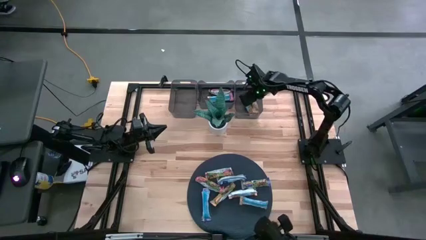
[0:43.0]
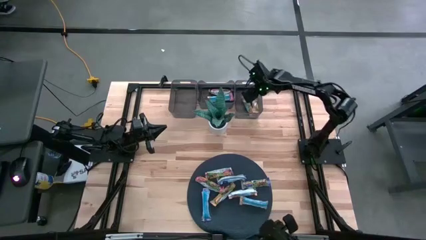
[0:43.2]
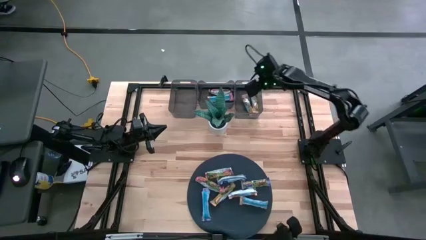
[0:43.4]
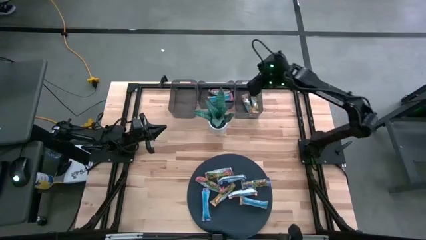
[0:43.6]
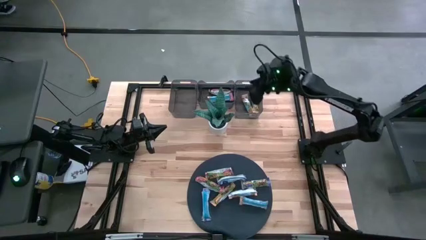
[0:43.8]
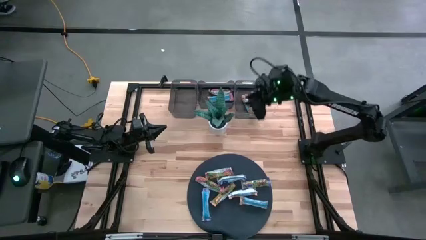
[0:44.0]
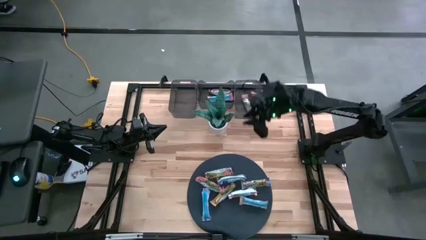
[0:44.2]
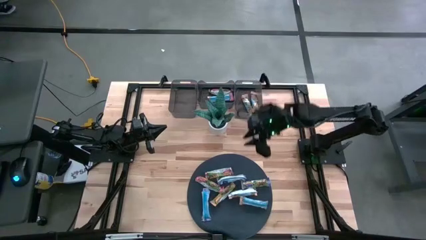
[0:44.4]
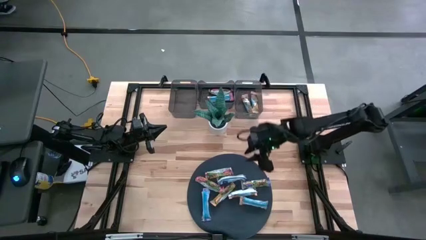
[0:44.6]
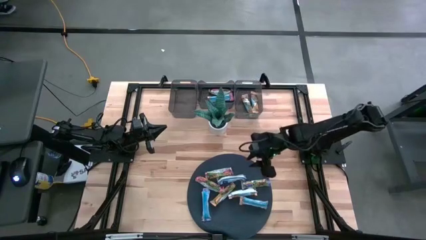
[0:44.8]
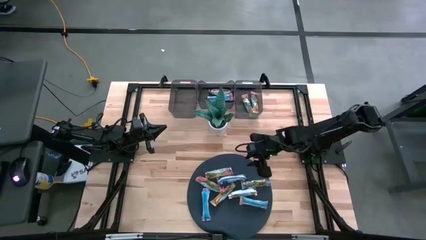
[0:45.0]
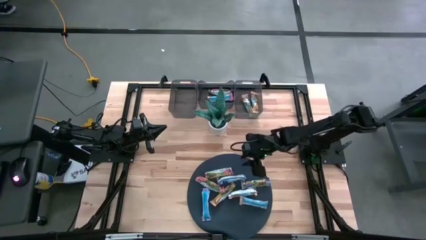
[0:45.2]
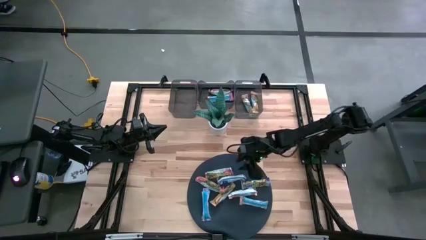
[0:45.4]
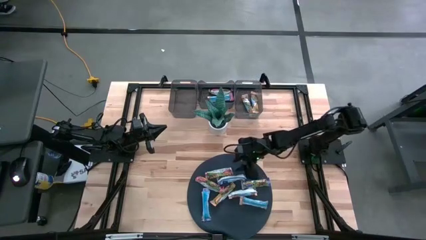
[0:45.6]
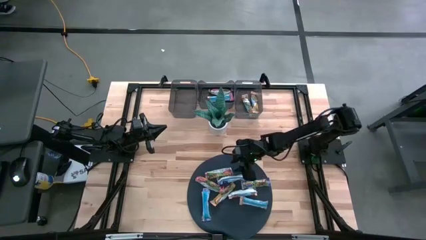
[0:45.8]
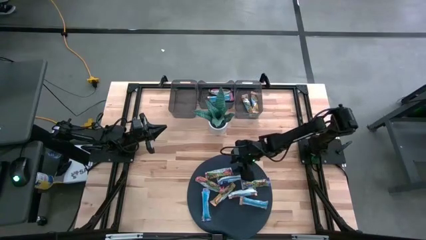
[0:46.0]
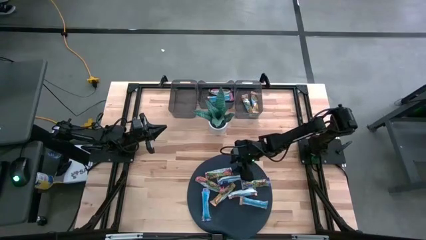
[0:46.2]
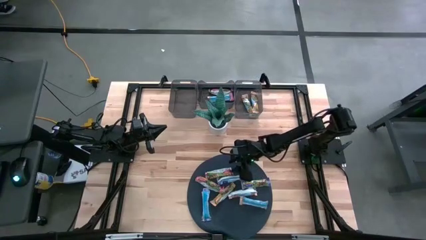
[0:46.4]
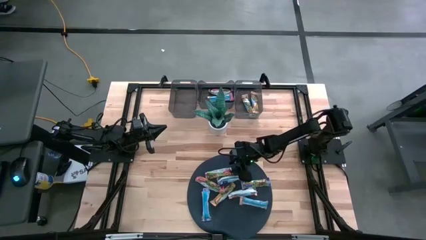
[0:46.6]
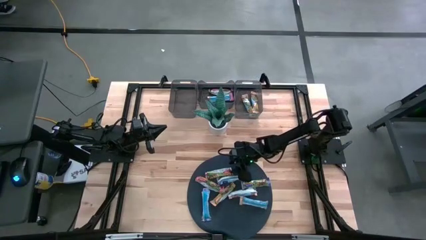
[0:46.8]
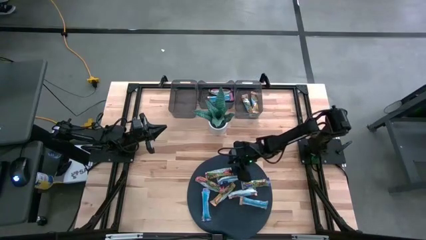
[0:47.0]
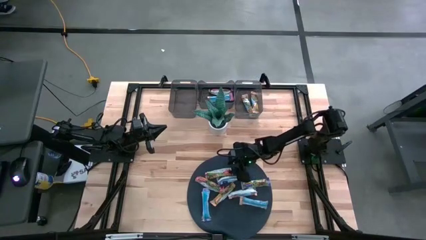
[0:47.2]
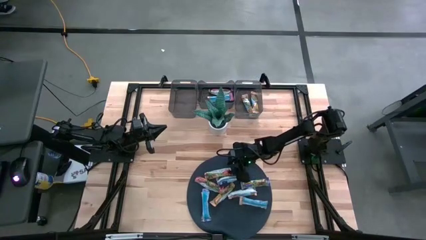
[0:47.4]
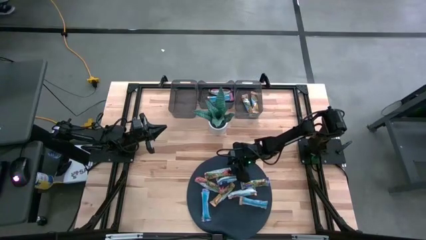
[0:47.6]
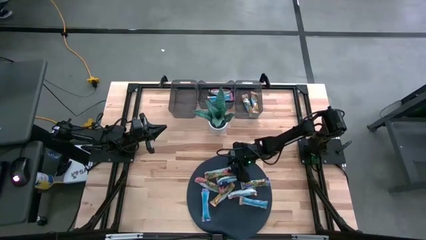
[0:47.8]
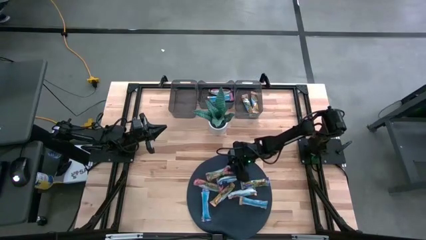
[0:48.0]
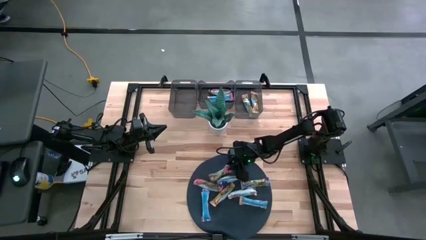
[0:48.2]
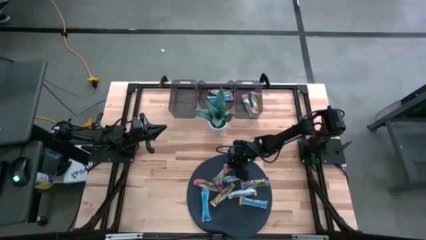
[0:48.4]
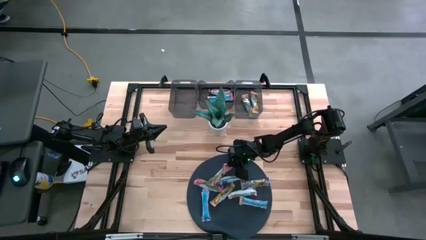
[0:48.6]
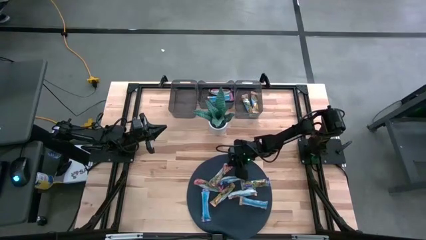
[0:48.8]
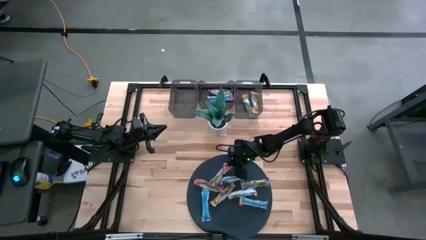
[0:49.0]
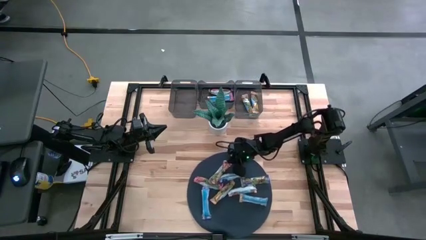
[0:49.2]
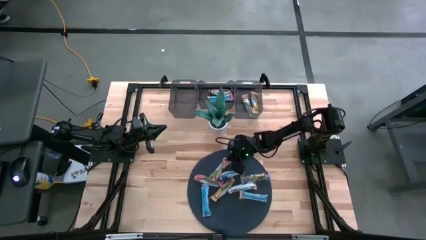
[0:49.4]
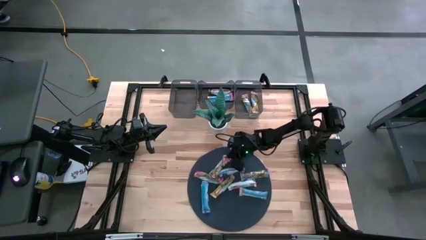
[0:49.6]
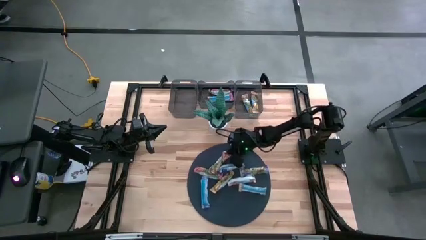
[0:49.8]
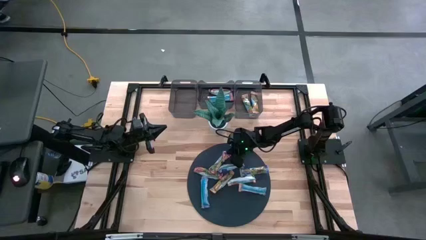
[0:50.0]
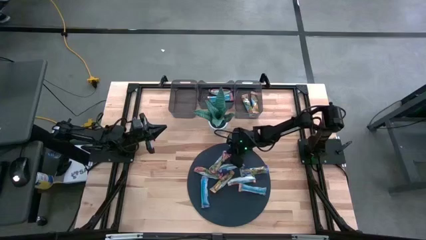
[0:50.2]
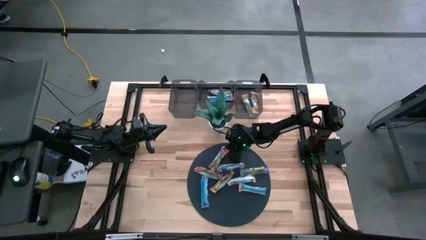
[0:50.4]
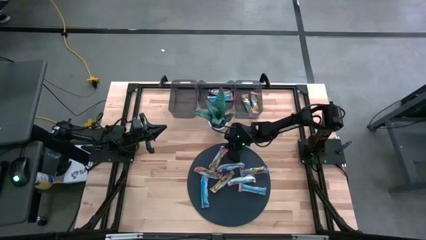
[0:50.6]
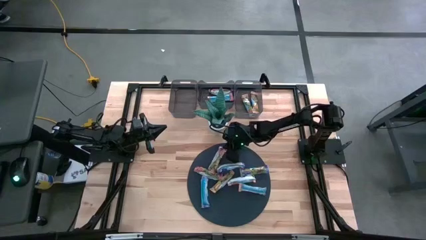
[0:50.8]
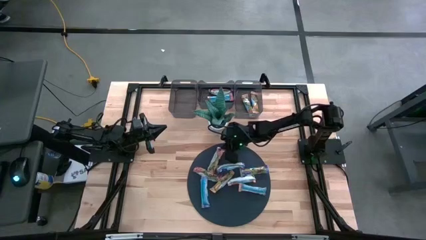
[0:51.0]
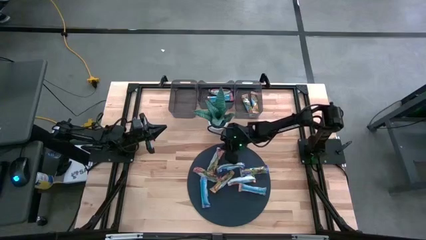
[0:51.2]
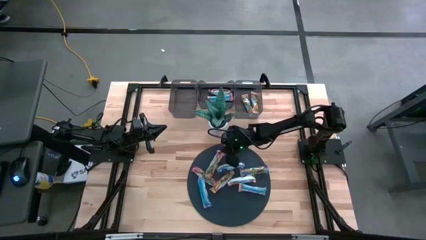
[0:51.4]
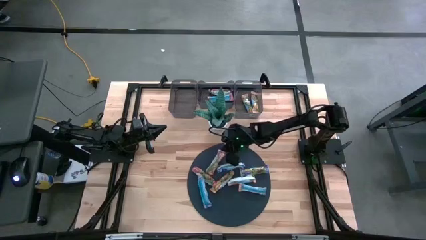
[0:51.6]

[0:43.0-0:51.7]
Task: Pick and place Granola Bars by type
Put the red granola bar into the middle black bin

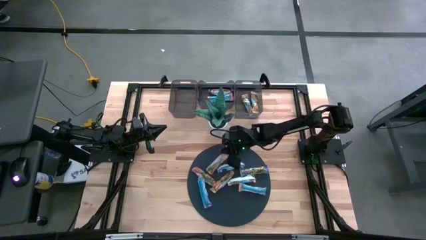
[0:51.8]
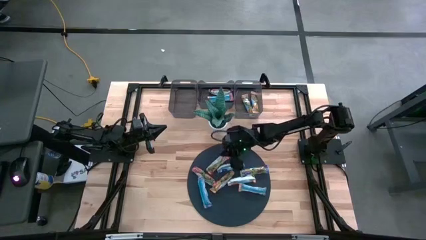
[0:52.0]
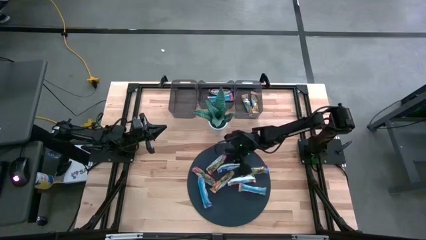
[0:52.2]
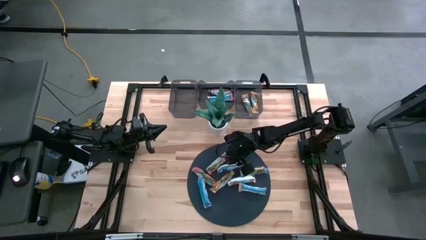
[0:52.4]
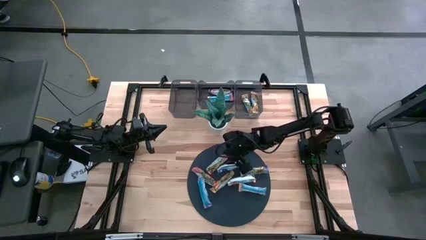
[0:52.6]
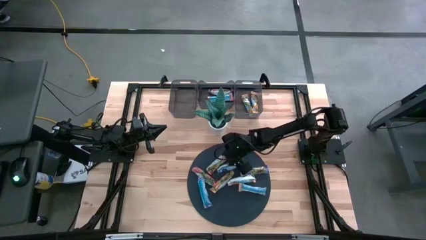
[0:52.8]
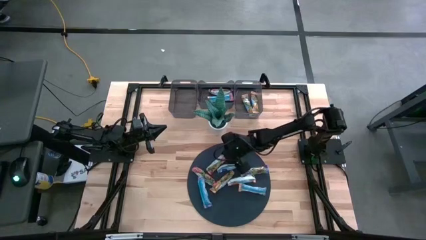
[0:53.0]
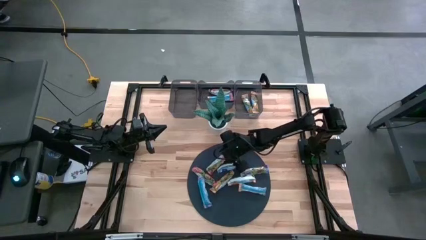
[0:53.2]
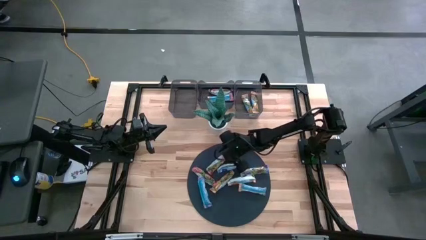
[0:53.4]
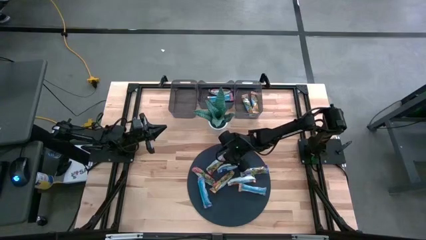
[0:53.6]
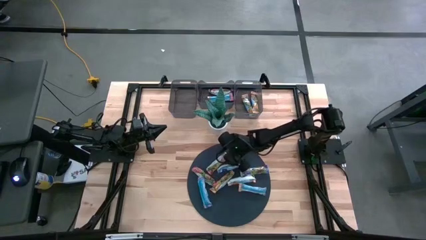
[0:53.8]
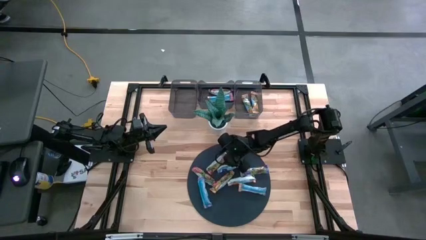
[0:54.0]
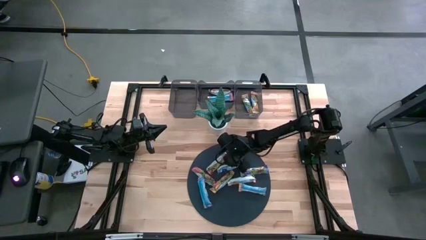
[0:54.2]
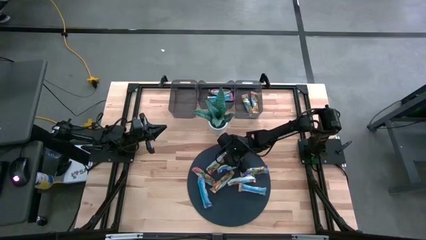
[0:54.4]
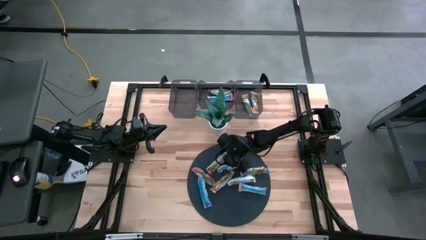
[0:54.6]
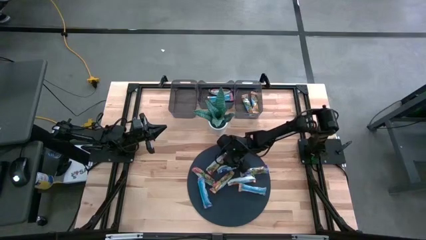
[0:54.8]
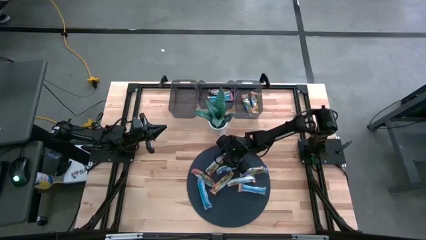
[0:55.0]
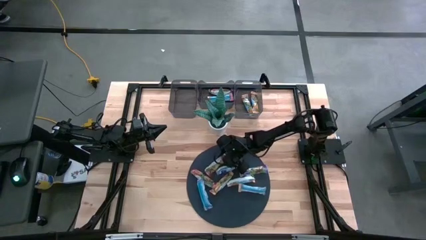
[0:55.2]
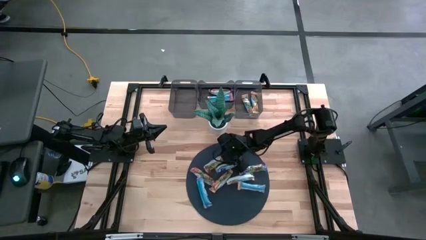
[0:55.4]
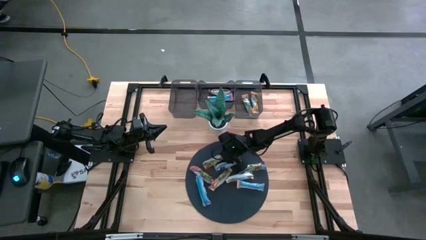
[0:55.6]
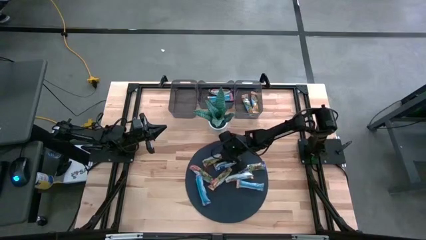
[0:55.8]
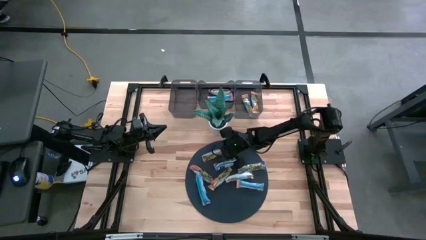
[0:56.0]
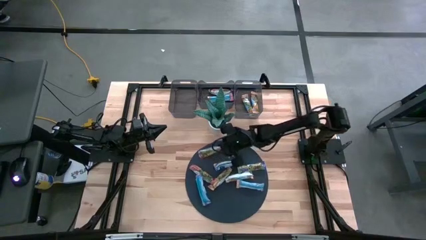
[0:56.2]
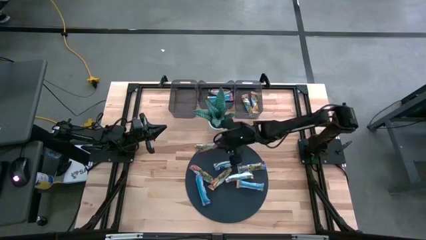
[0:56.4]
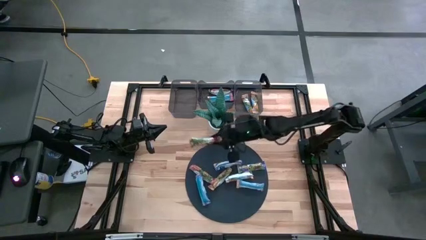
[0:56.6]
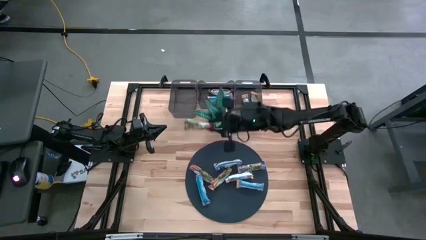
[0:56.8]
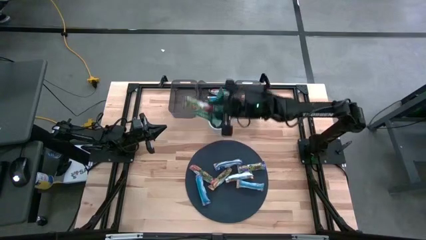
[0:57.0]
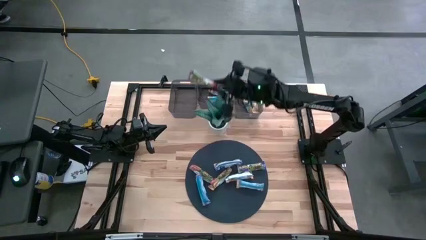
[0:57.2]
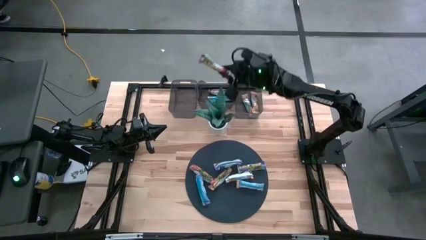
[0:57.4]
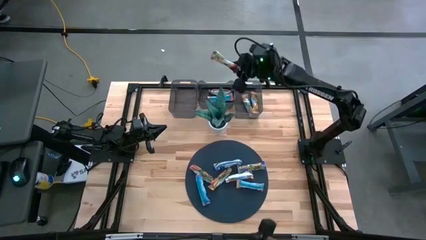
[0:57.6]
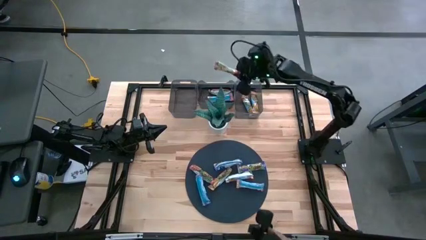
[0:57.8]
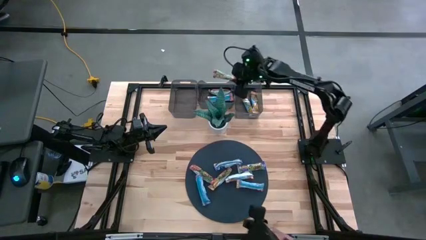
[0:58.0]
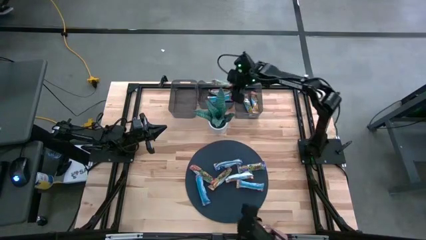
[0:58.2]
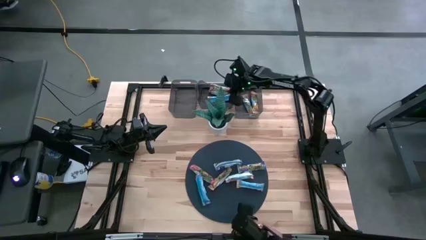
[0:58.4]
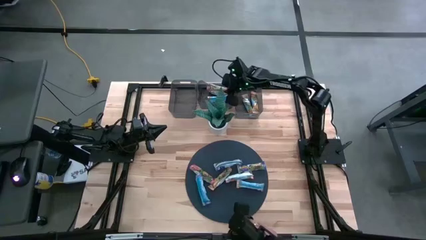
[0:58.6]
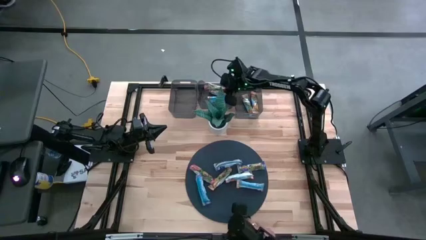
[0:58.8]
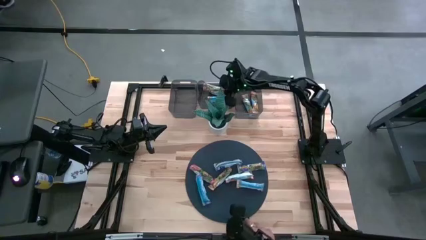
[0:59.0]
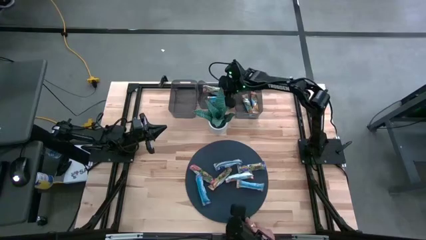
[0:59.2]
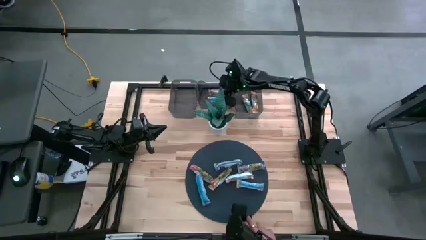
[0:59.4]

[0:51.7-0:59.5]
Put the red granola bar into the middle black bin
